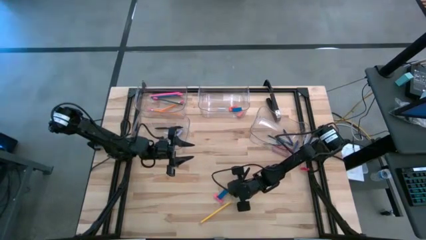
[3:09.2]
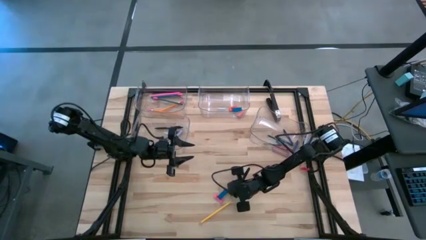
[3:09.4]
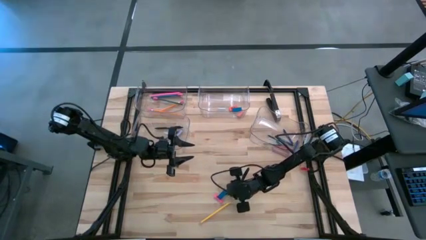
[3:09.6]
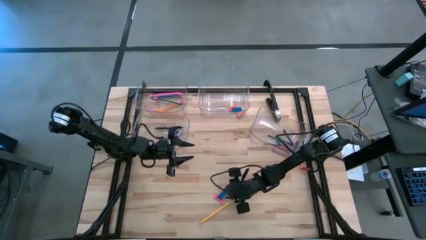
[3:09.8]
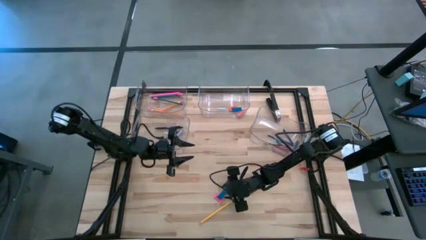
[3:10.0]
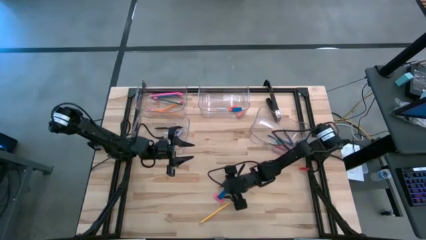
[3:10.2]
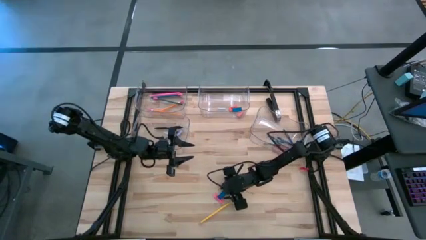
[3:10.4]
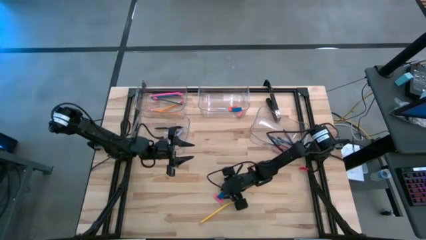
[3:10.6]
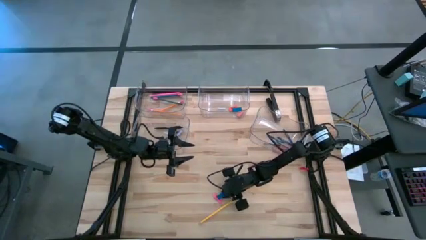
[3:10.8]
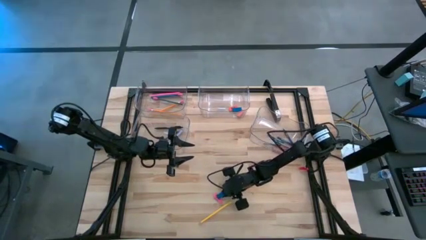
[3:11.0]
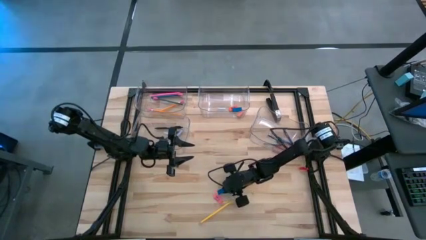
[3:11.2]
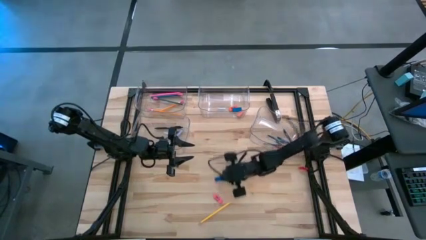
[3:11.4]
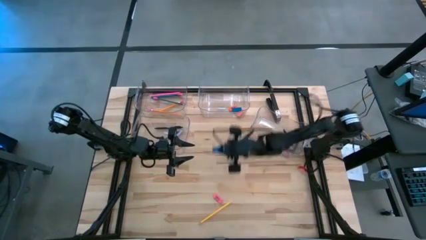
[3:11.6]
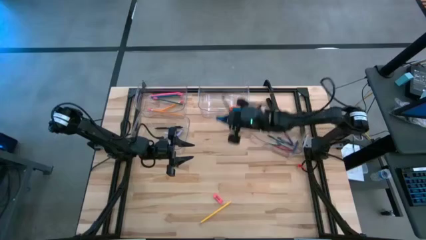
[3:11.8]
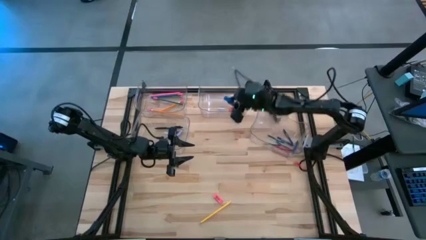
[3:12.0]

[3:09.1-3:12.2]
Task: Sort crayons/erasers/pens/pencils in bins
Put the blue eraser into the top right transparent bin

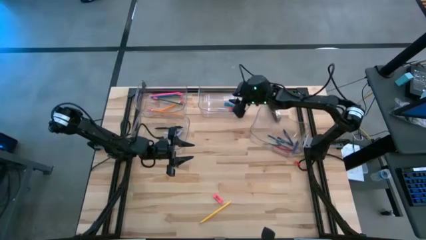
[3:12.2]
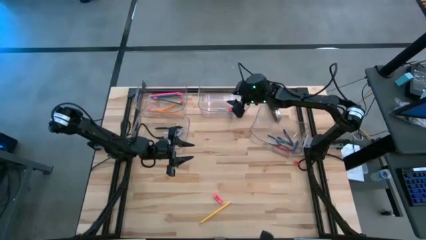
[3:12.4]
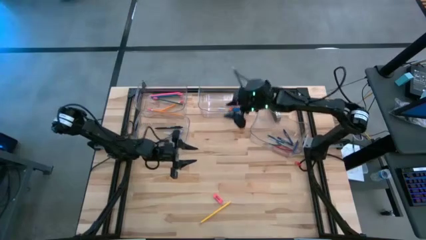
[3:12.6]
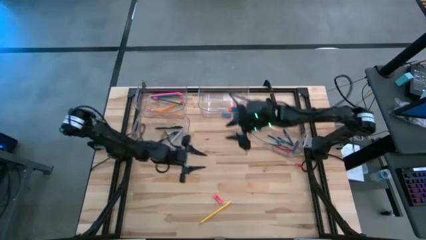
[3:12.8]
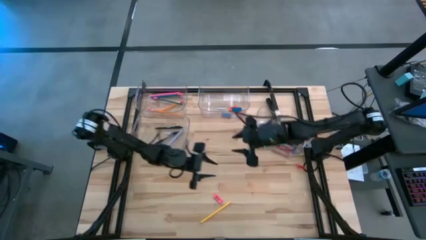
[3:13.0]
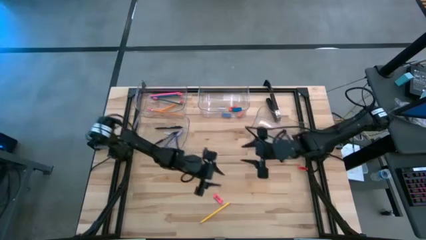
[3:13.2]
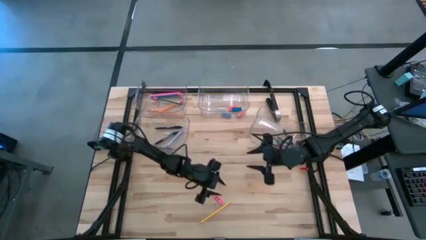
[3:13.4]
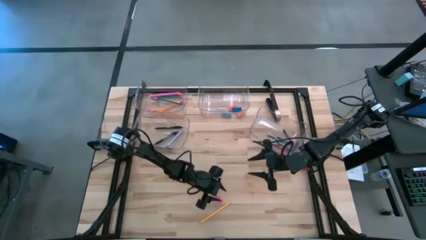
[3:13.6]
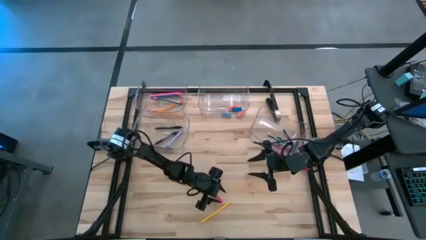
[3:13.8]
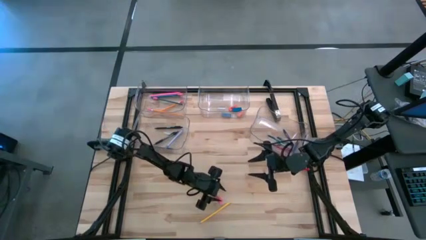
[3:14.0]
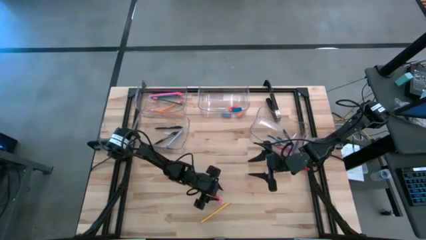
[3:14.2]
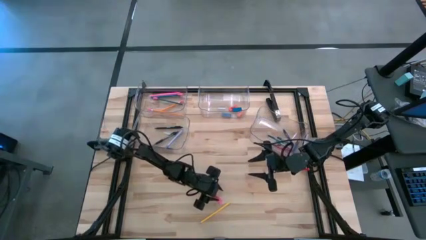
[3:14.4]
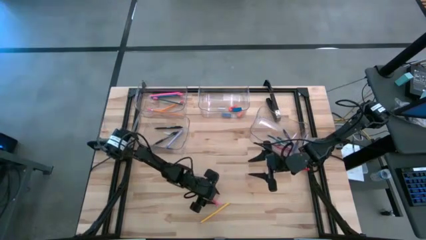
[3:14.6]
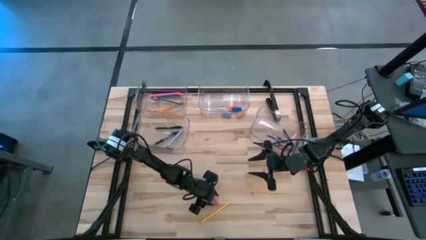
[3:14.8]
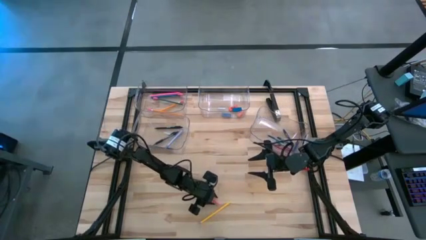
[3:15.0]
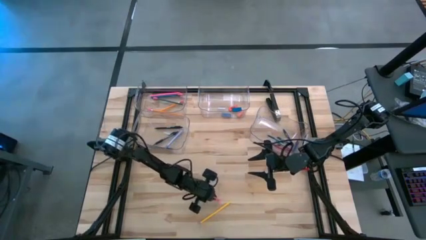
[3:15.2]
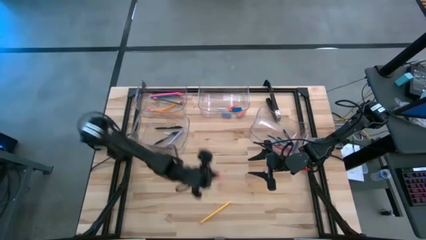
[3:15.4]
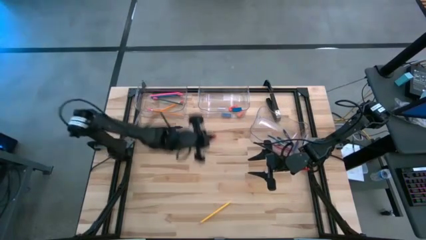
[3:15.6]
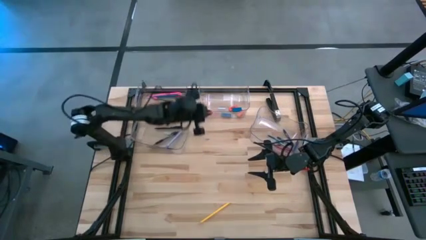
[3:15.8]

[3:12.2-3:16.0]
Put the pink eraser into the top right transparent bin

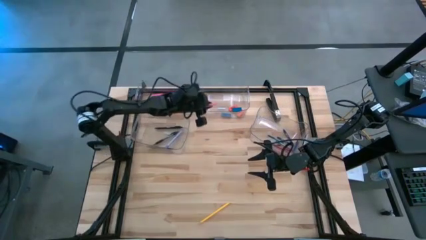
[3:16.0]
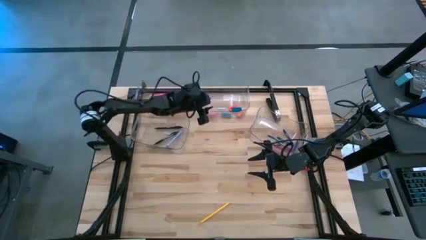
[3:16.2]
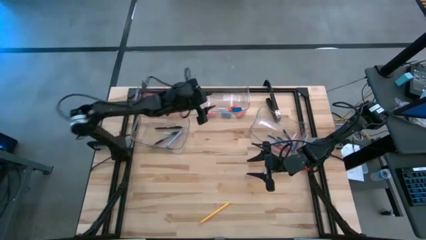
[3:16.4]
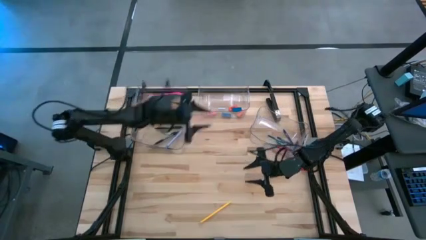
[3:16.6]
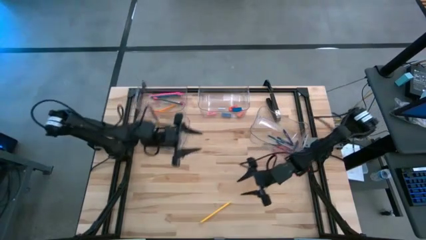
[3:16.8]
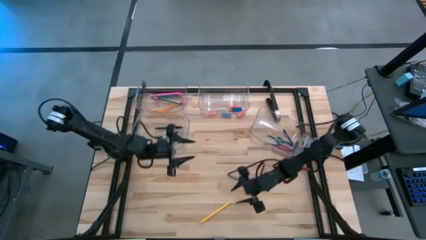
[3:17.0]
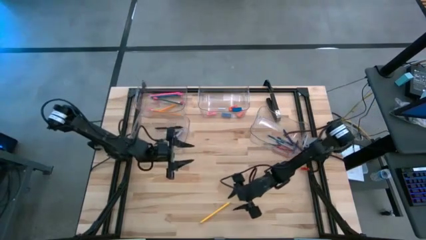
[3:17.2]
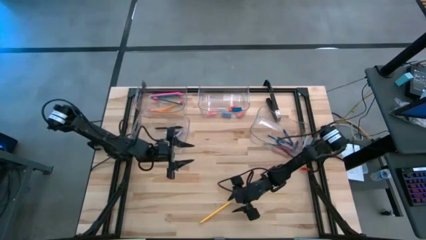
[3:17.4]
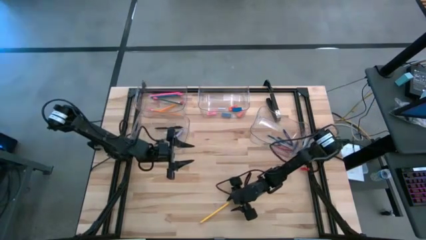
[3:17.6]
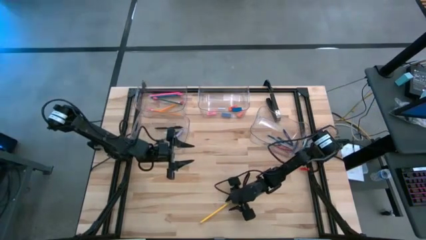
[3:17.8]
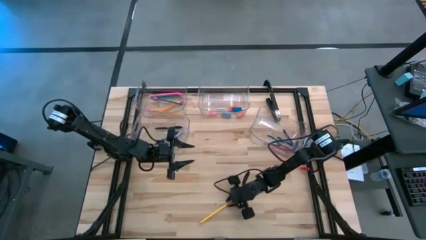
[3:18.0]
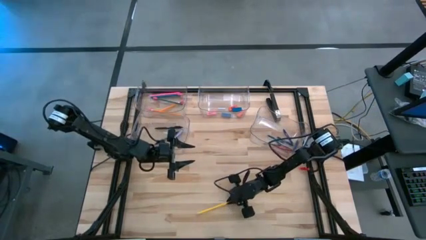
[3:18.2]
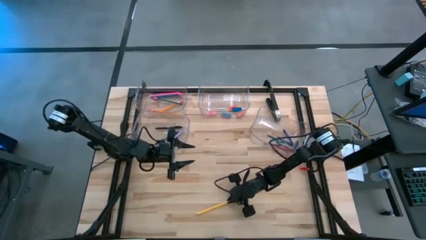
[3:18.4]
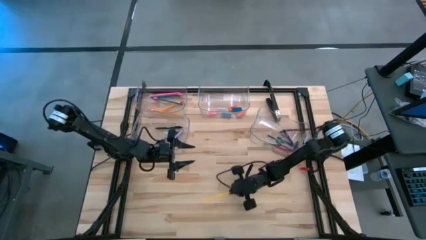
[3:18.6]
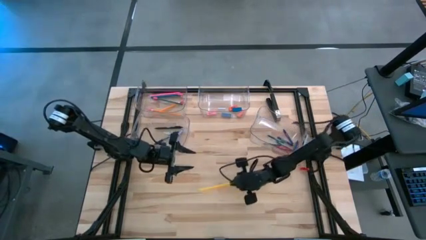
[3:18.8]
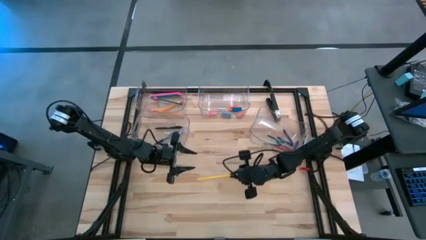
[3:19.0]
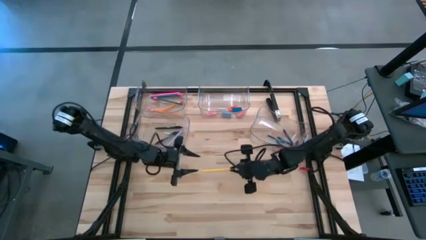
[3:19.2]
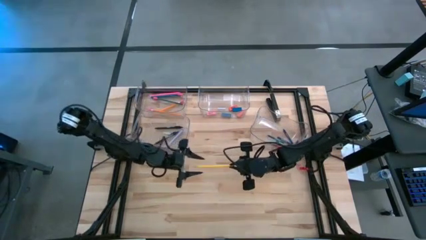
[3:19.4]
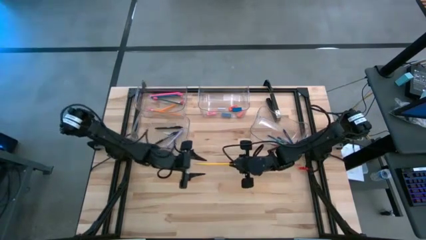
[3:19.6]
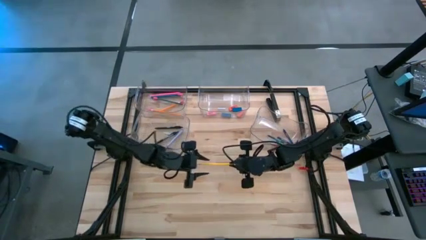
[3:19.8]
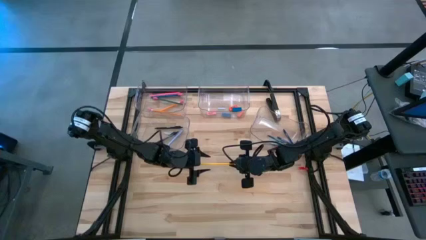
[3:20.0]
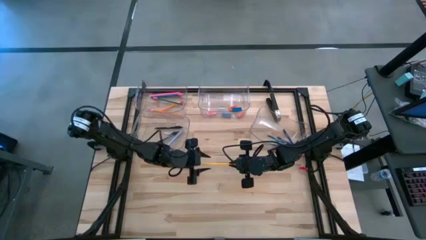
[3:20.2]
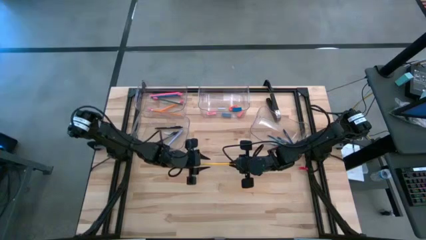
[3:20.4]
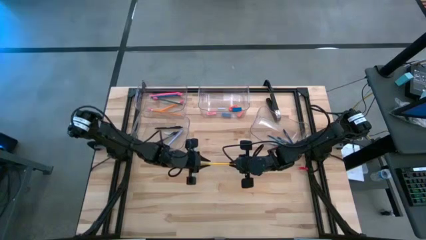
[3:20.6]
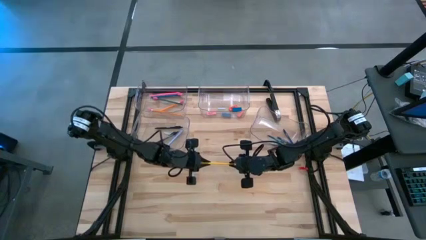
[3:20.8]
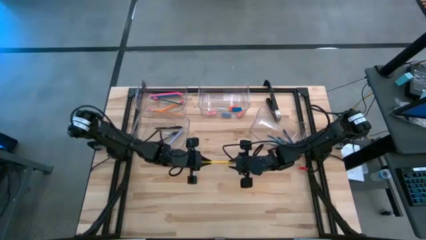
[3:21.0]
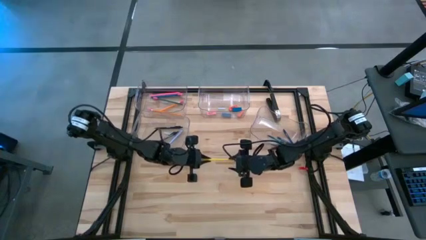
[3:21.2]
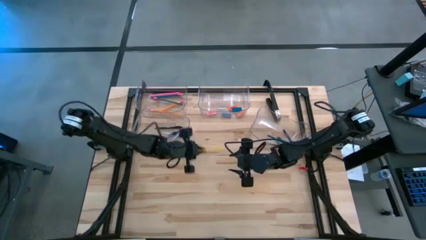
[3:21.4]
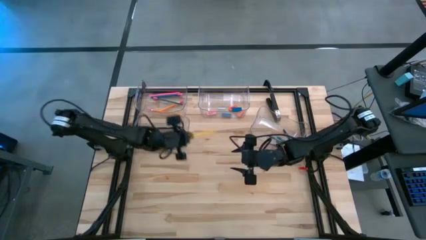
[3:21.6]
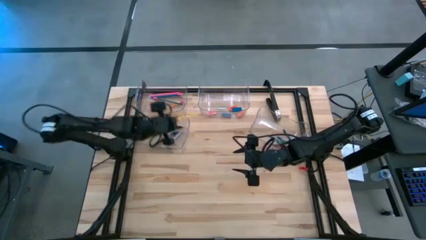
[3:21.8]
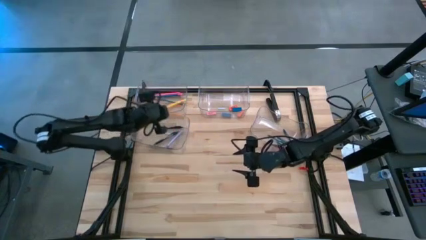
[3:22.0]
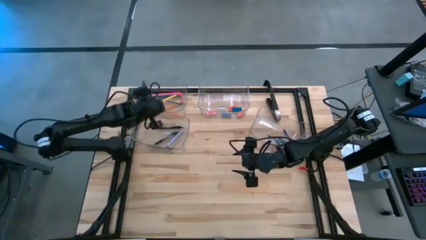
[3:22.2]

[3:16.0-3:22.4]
Put the yellow pencil into the top left transparent bin

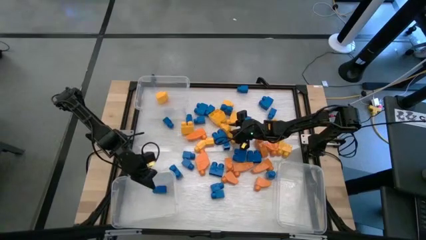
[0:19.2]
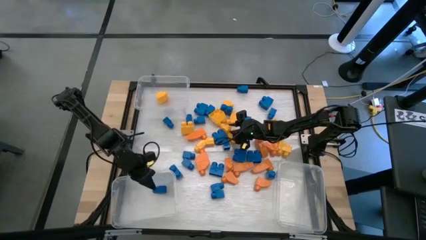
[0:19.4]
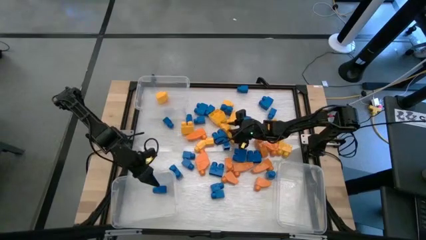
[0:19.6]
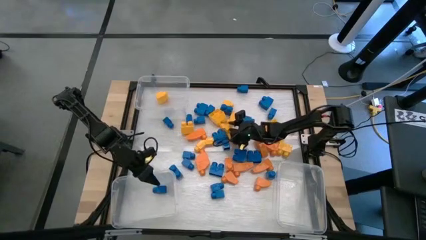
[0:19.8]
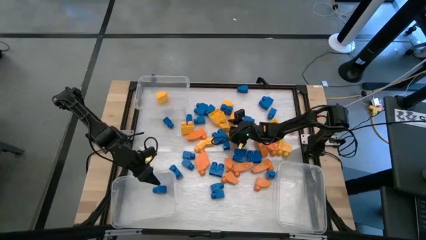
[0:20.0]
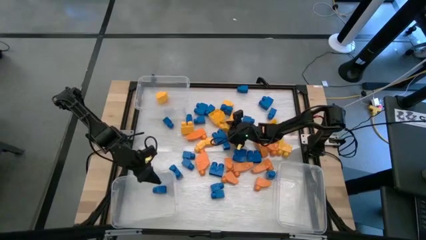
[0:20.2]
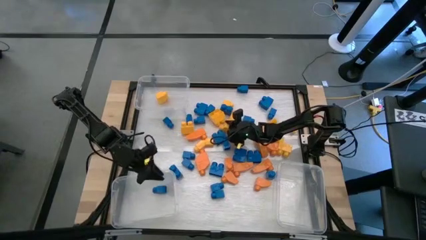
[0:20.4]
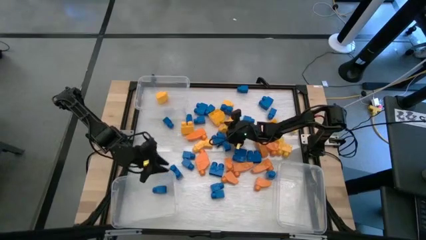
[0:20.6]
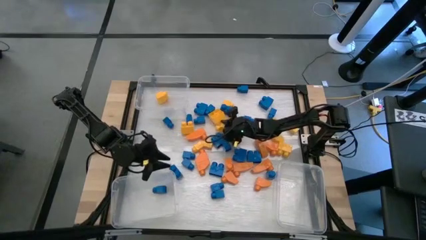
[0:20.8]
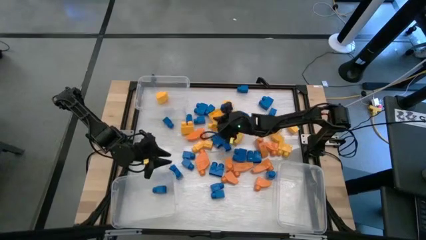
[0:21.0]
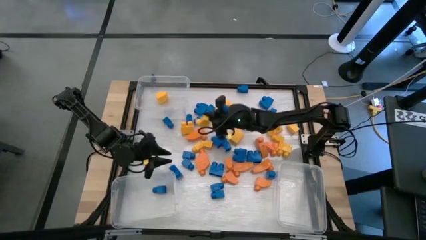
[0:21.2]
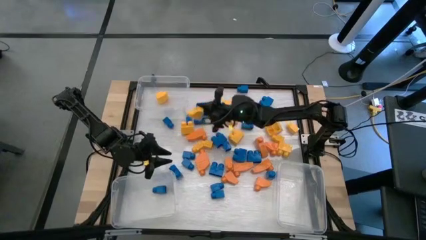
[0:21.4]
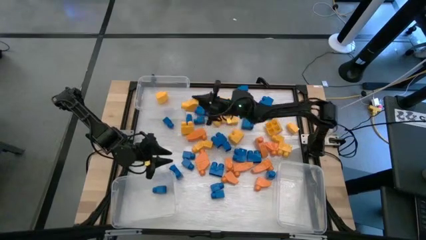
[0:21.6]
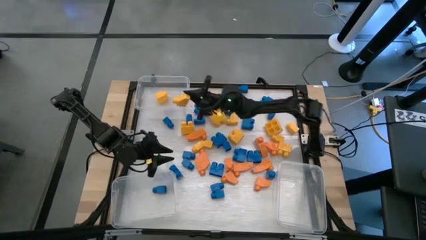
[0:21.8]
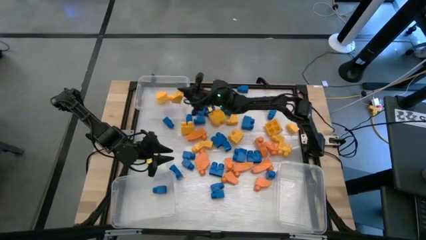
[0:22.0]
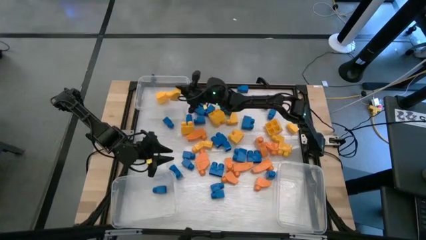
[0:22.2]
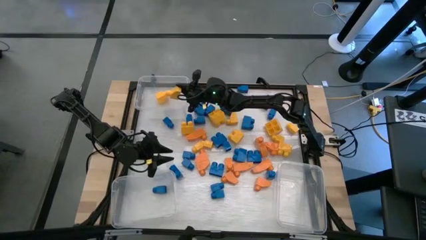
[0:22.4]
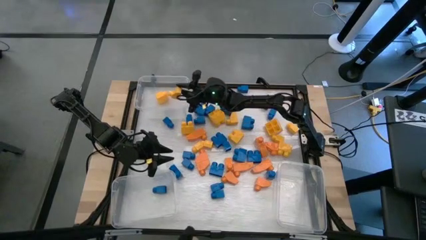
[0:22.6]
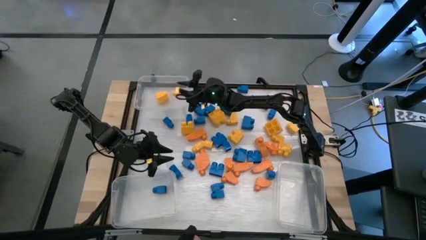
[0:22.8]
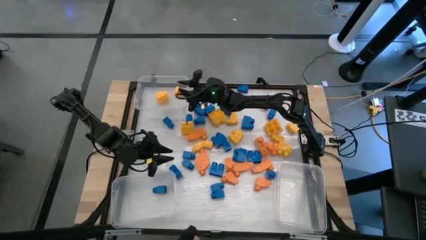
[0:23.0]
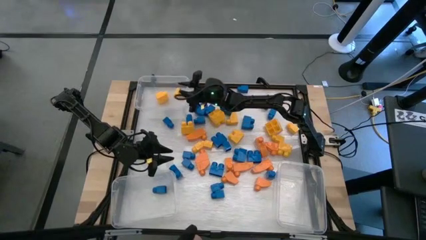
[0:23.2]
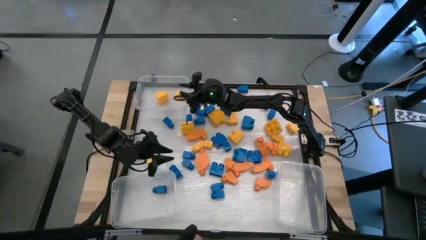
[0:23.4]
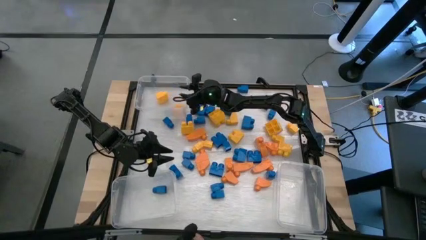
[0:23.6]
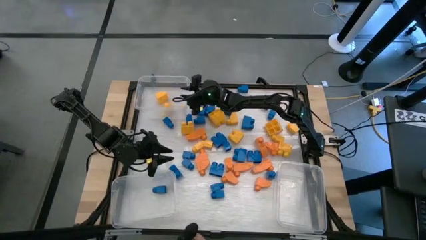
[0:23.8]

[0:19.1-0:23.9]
Task: Sort blocks
Put the yellow game piece into the top transparent bin
